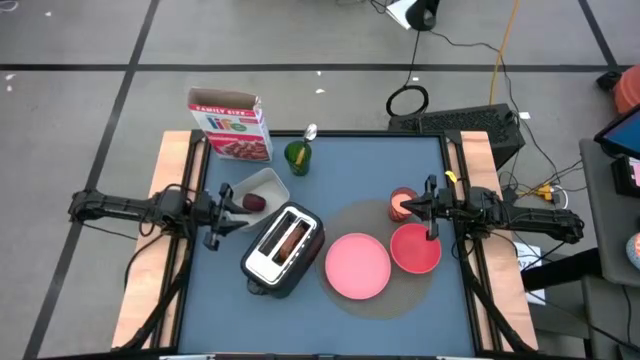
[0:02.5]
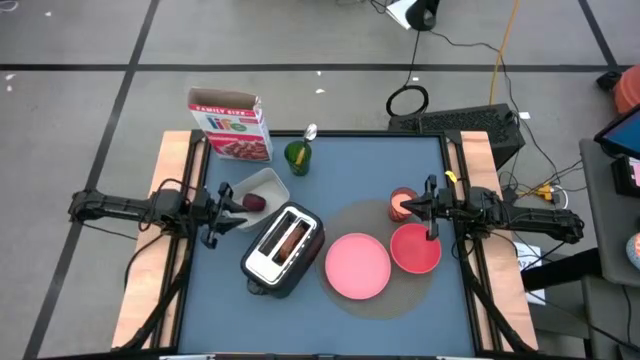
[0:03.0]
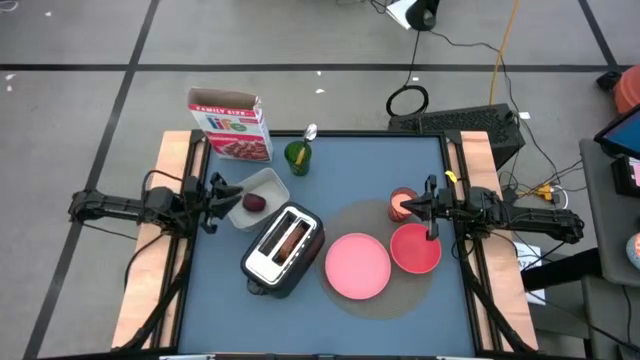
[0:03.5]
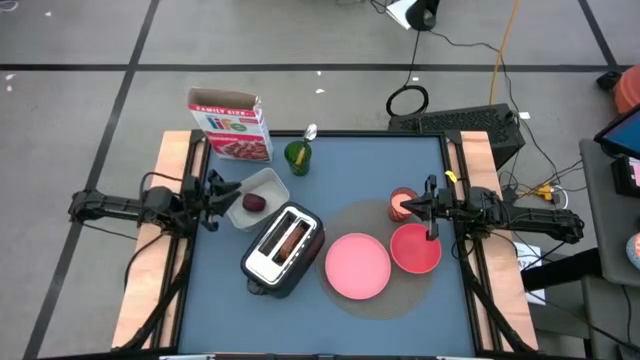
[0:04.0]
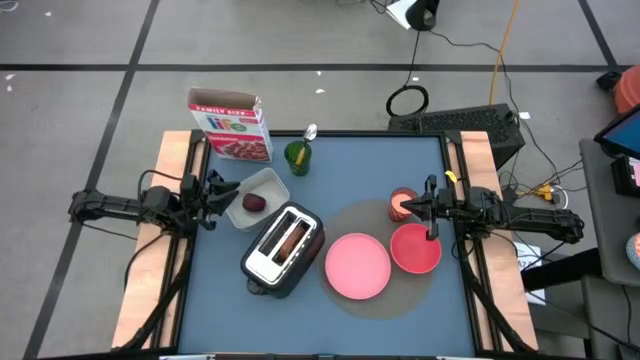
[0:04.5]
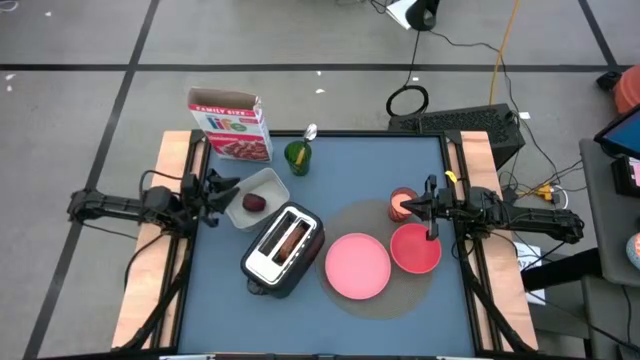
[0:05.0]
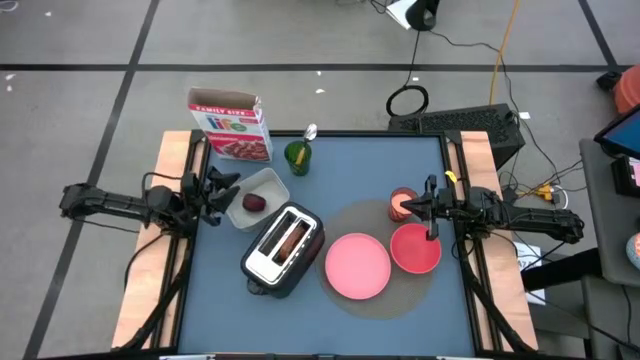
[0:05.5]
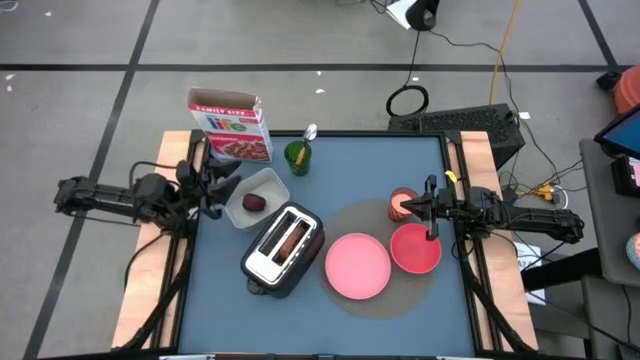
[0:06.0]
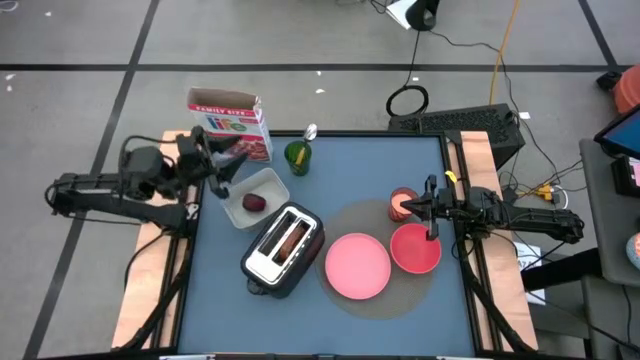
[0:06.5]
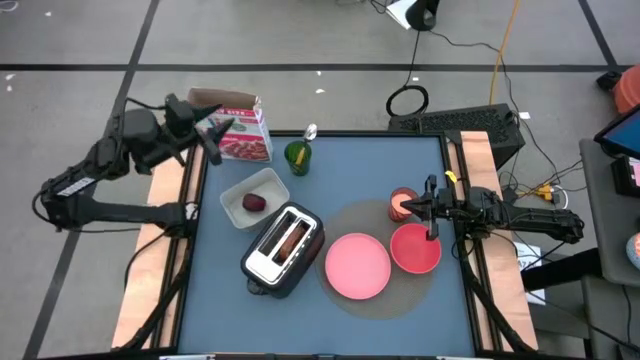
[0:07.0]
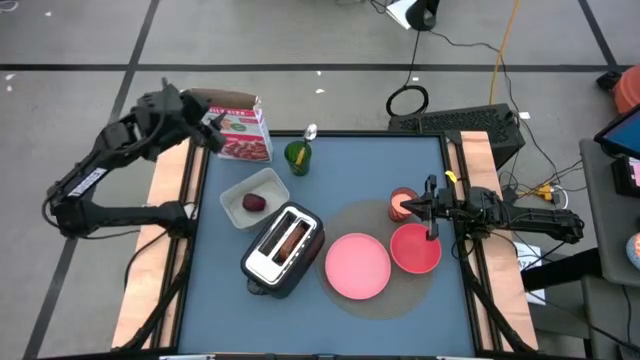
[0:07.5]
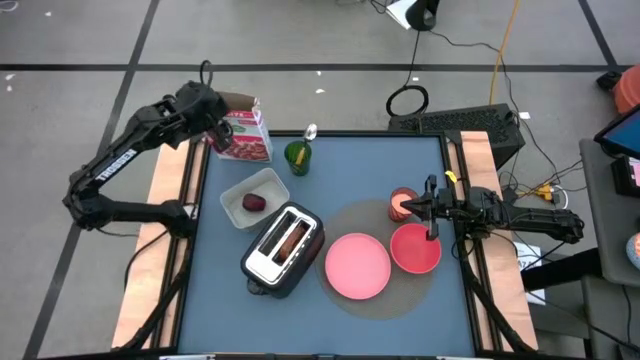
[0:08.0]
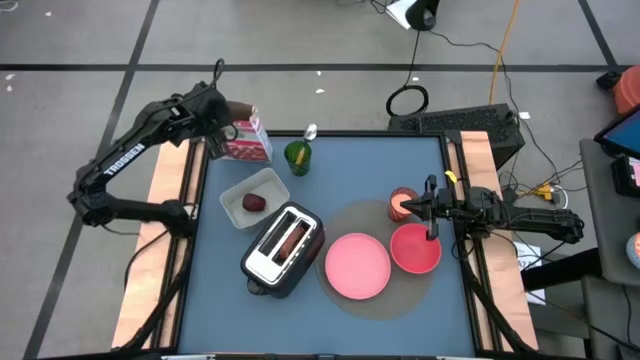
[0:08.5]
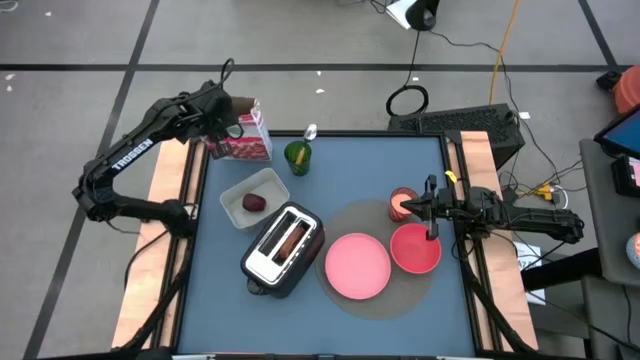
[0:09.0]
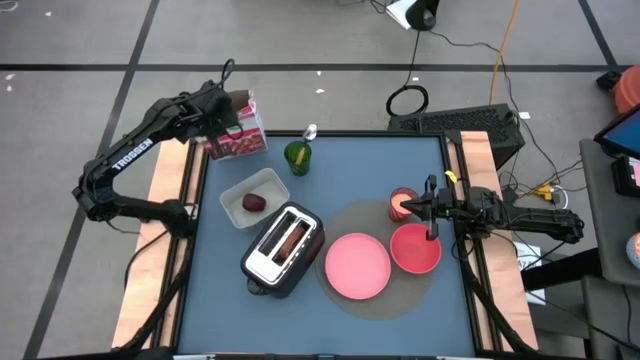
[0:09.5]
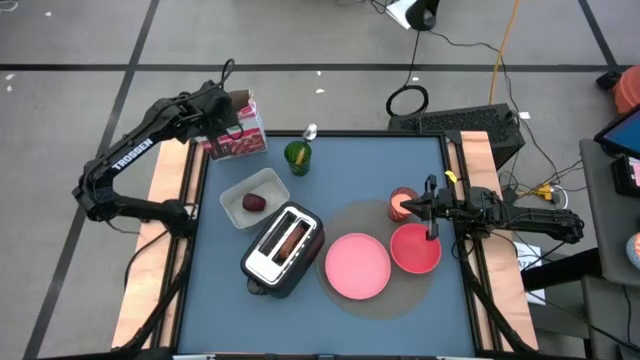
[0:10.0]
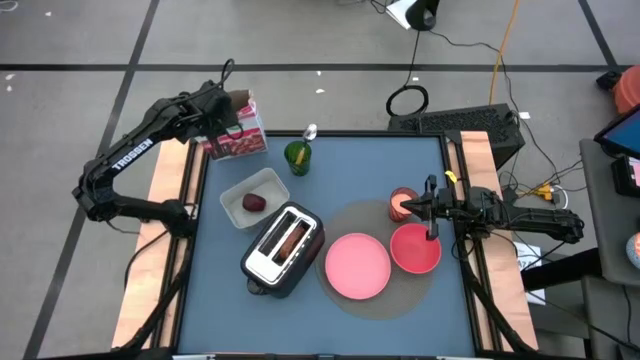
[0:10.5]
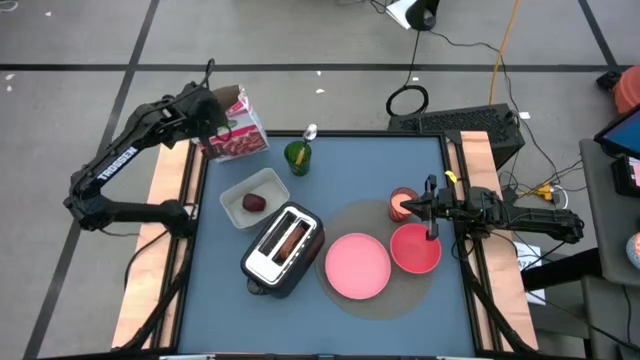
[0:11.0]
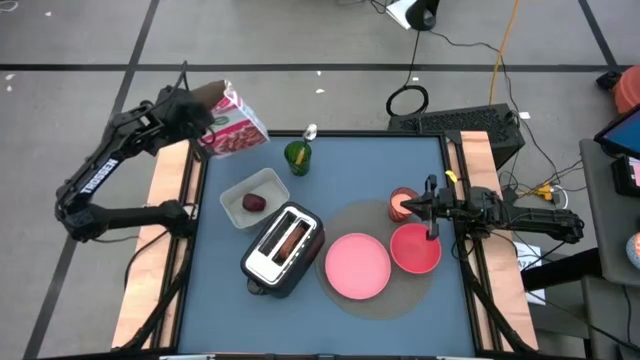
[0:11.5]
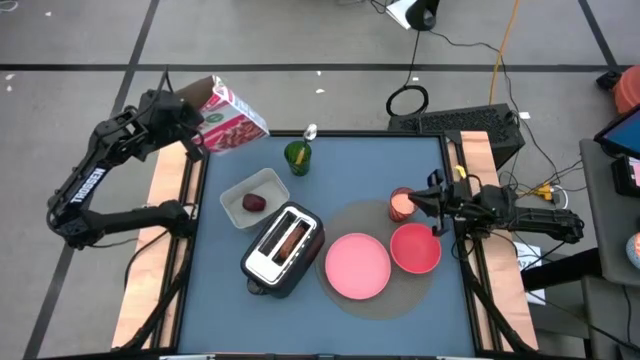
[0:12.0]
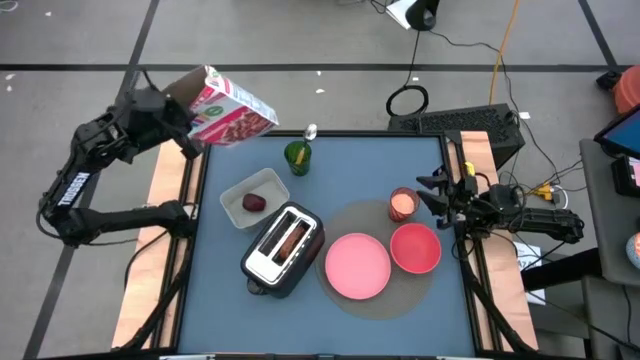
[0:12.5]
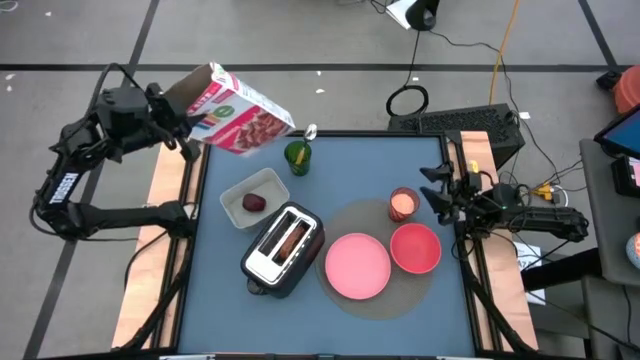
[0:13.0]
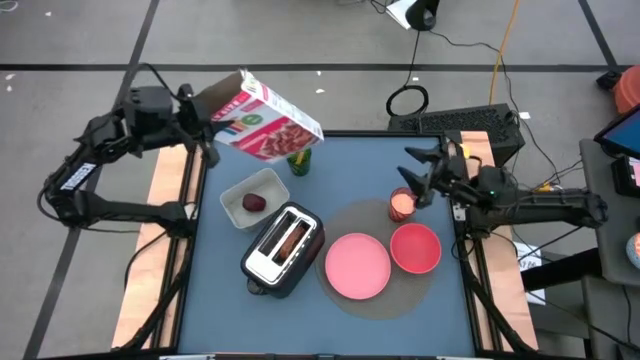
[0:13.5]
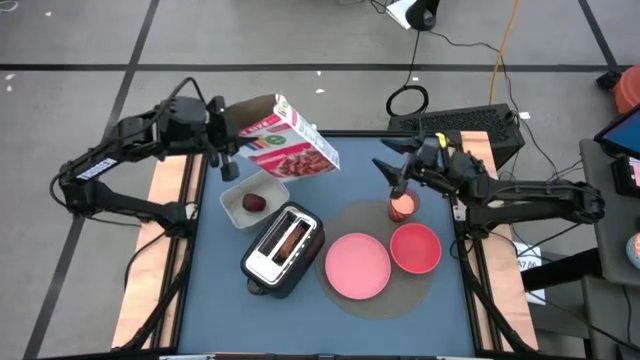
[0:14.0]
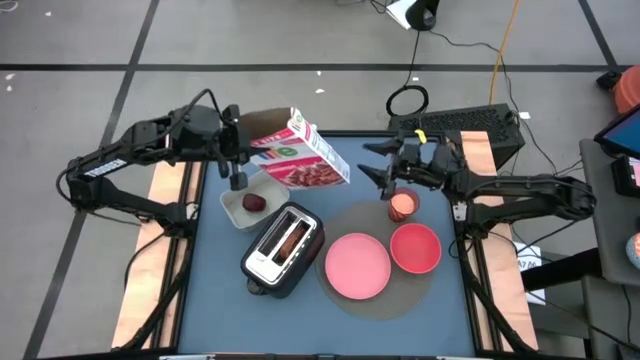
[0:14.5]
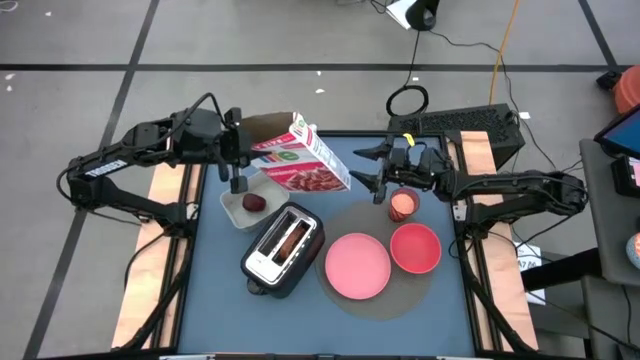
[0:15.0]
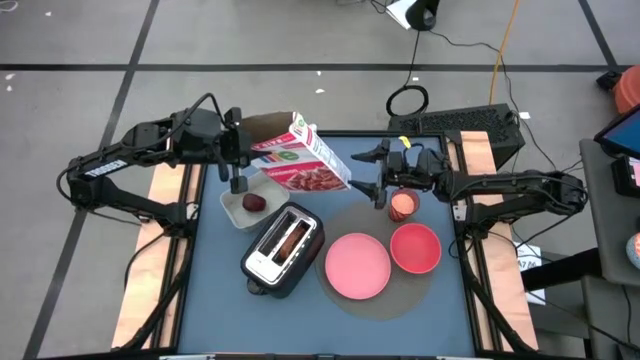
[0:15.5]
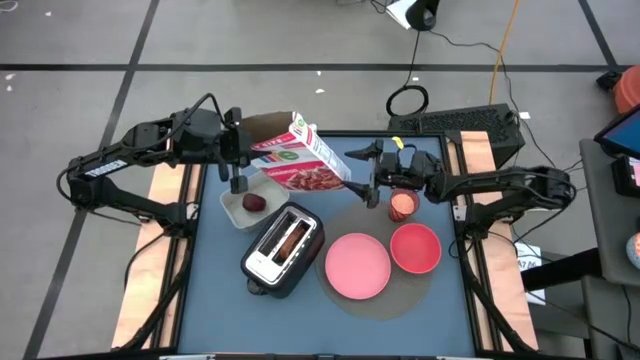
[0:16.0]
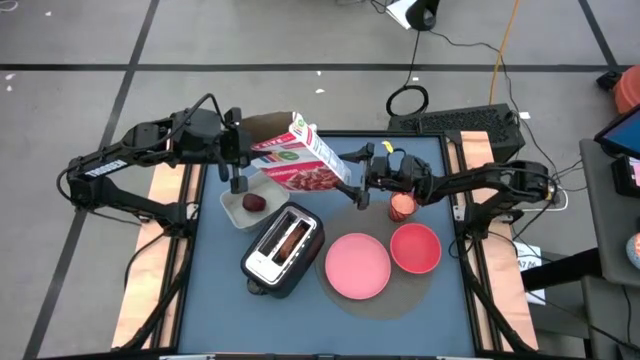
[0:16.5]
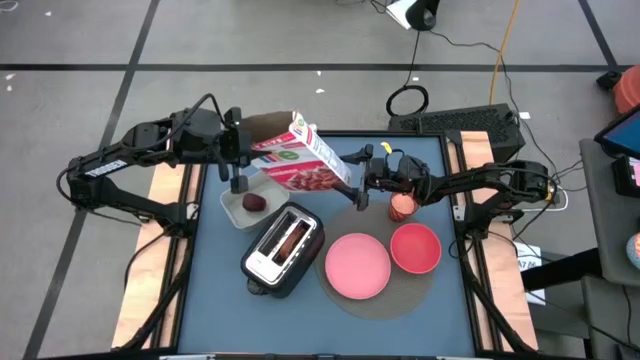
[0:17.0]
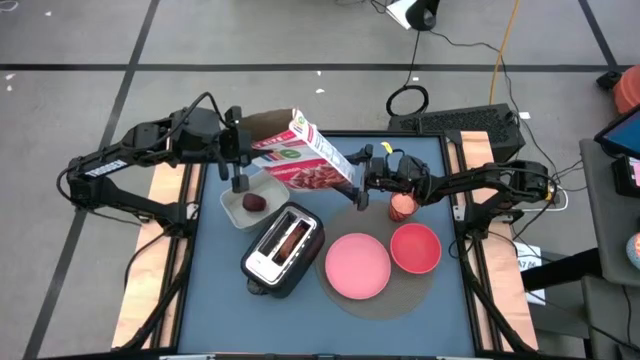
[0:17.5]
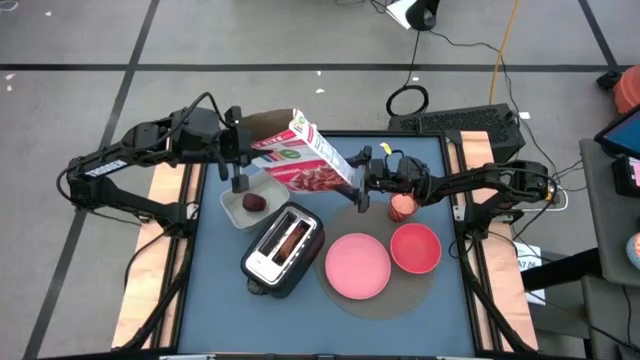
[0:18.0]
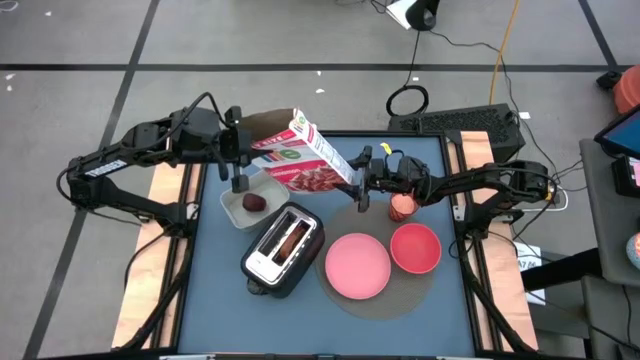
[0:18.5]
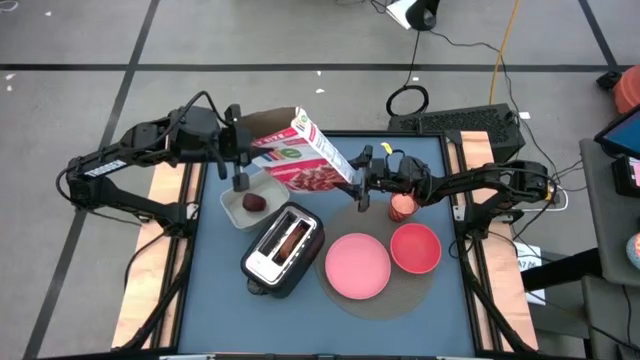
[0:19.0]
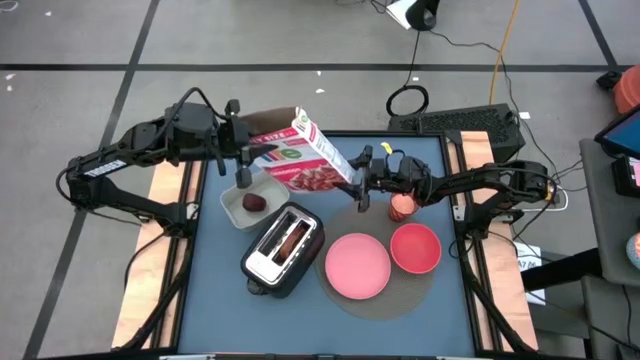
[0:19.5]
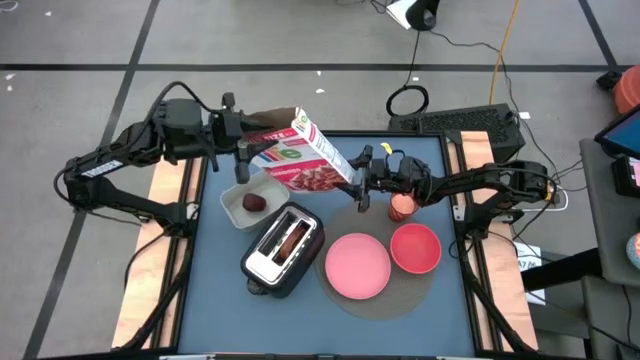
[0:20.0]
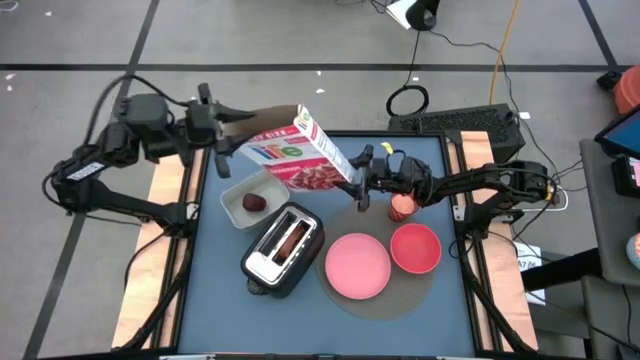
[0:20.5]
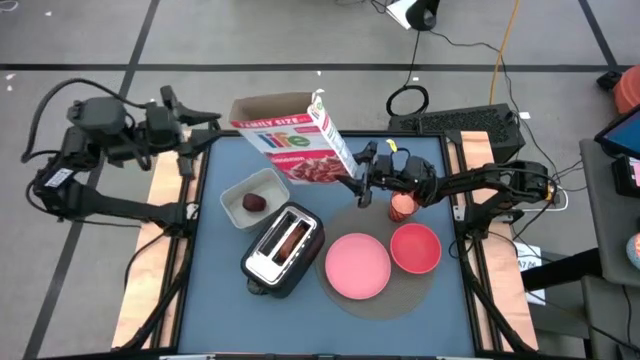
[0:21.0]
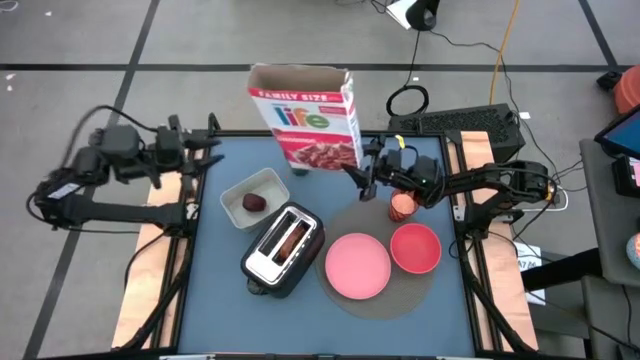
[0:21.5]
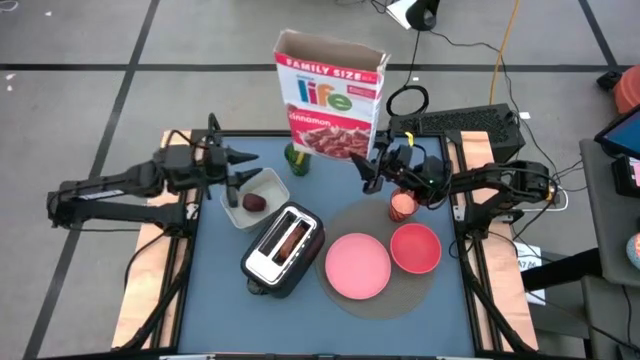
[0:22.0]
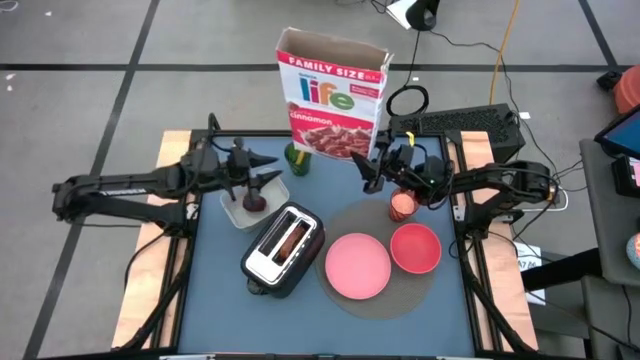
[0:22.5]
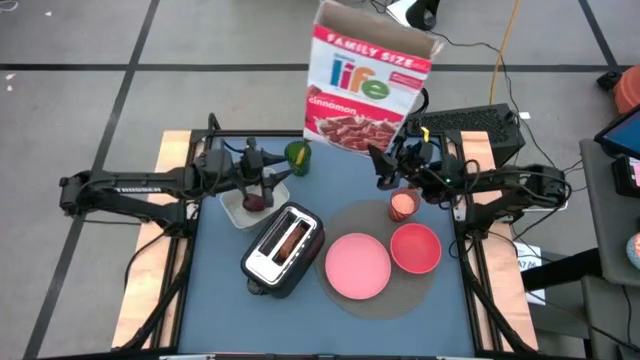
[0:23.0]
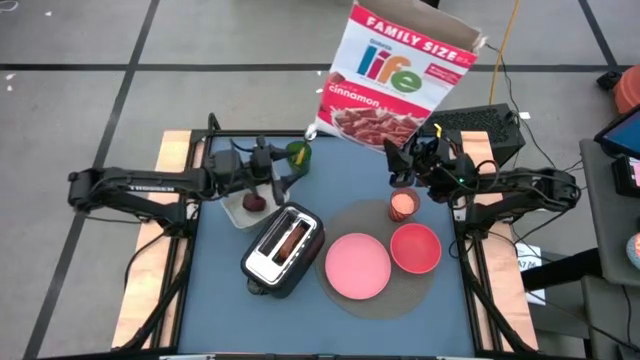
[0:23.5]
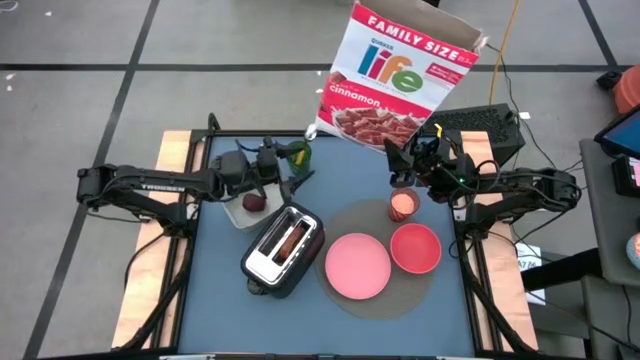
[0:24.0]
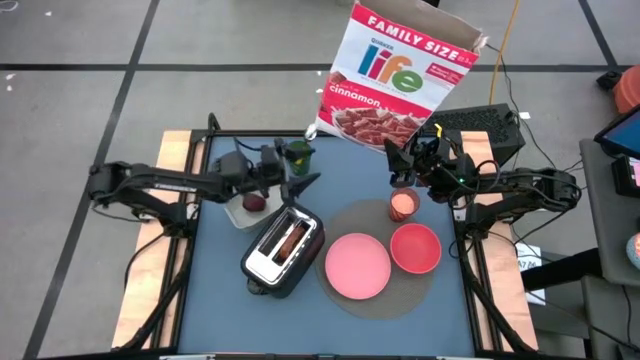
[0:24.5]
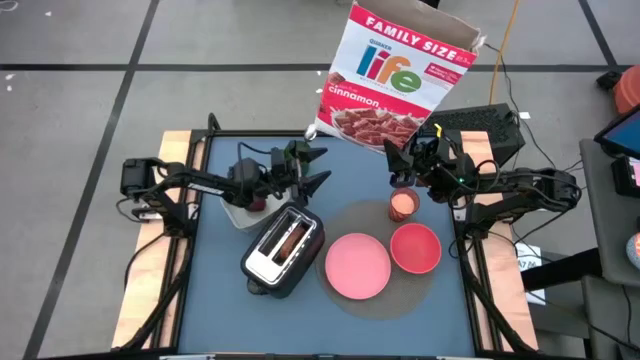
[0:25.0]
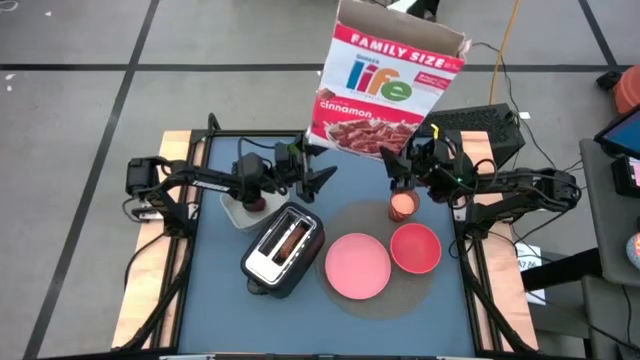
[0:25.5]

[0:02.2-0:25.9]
Task: Arrange a breakfast setting
Pour the cereal from the cereal box into the red bowl
